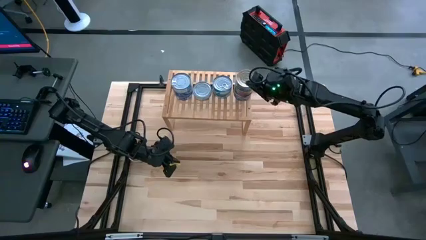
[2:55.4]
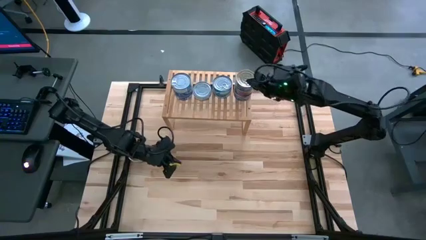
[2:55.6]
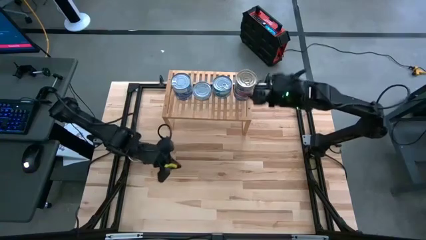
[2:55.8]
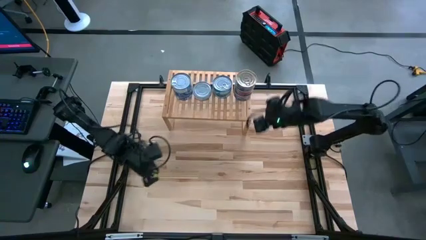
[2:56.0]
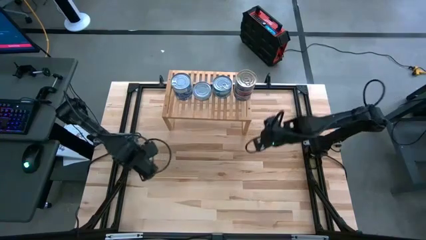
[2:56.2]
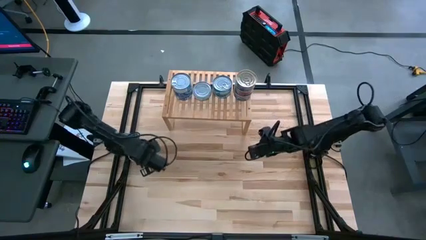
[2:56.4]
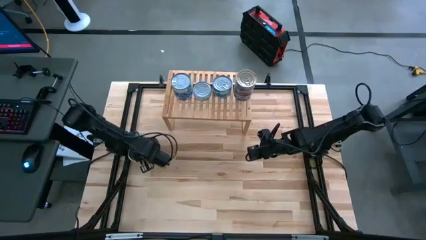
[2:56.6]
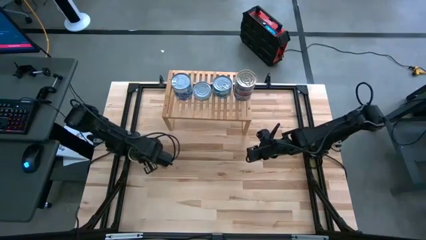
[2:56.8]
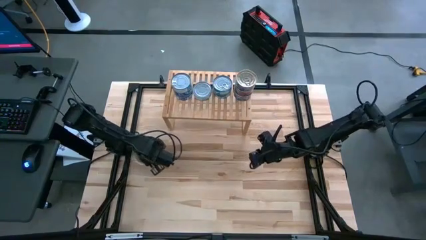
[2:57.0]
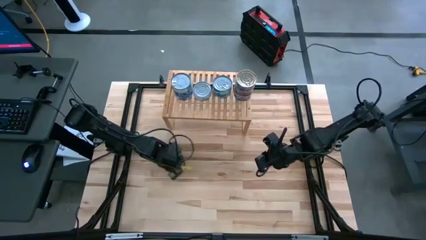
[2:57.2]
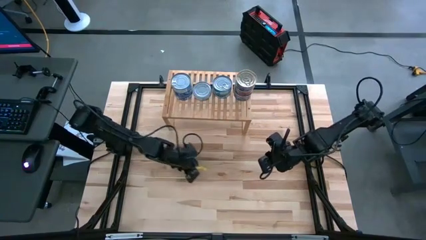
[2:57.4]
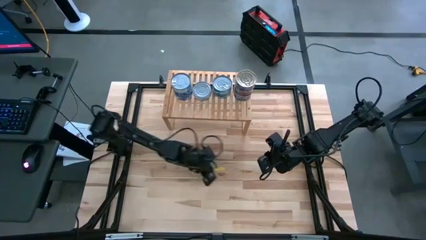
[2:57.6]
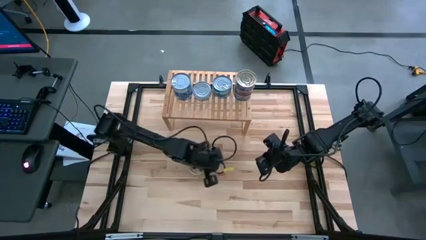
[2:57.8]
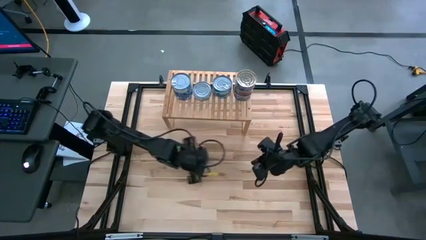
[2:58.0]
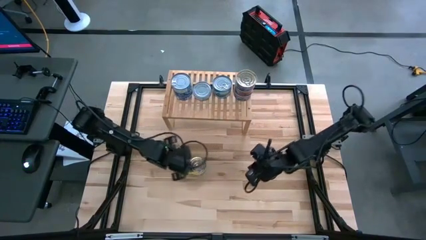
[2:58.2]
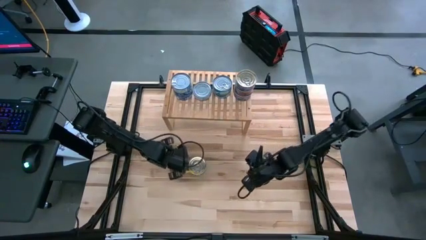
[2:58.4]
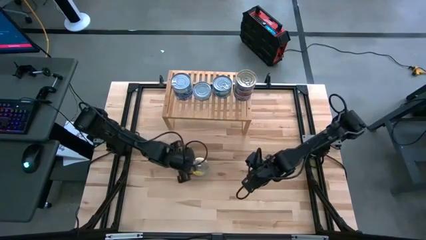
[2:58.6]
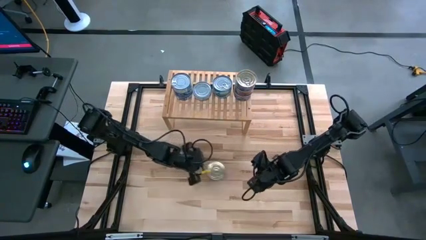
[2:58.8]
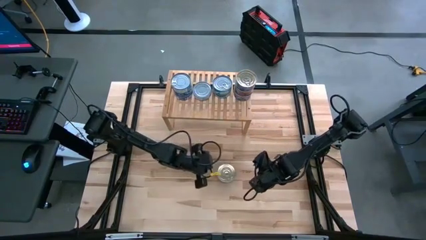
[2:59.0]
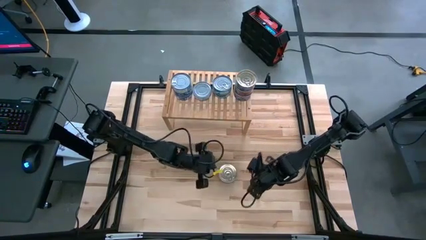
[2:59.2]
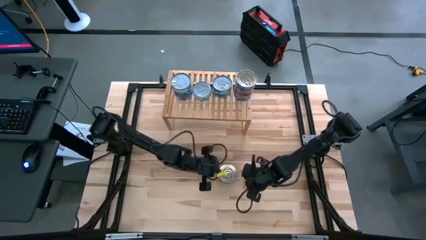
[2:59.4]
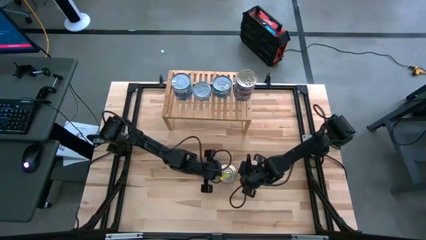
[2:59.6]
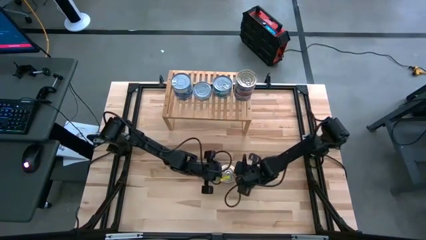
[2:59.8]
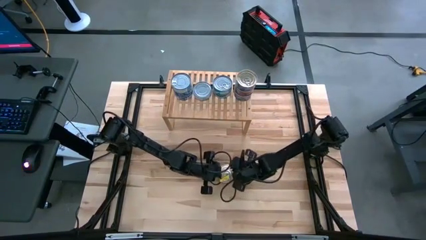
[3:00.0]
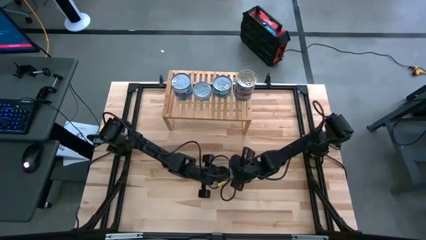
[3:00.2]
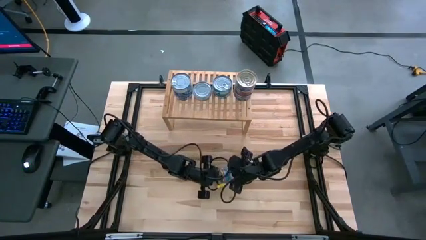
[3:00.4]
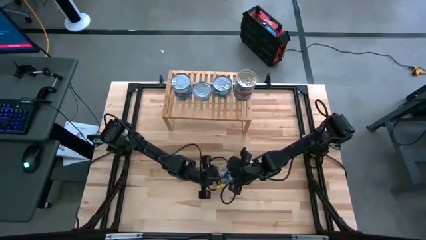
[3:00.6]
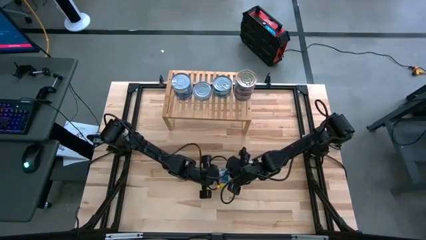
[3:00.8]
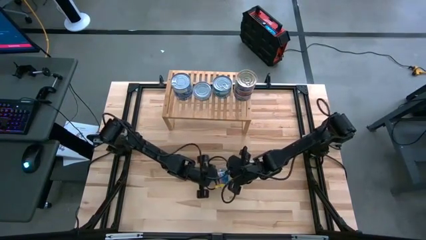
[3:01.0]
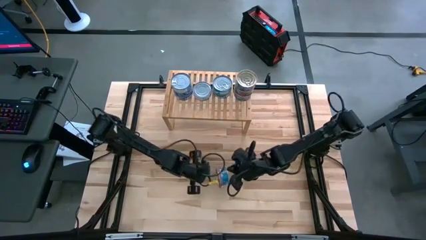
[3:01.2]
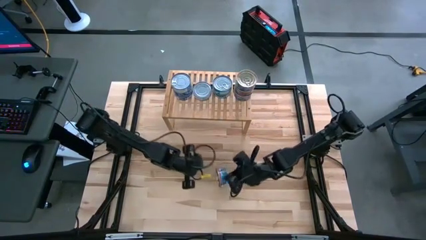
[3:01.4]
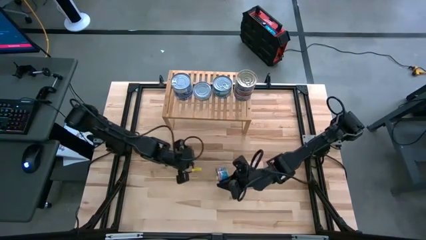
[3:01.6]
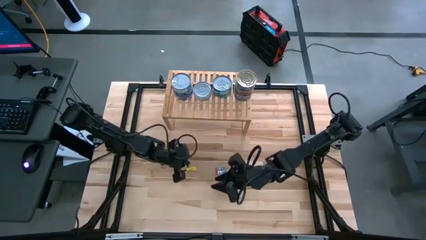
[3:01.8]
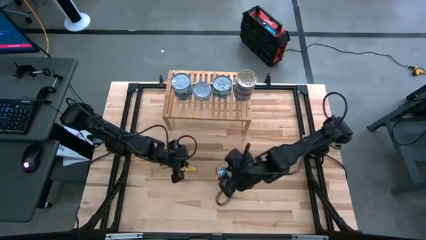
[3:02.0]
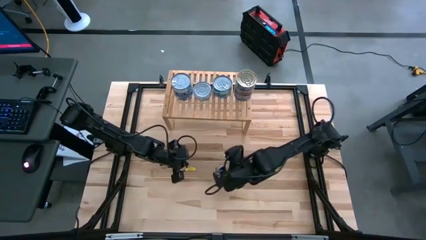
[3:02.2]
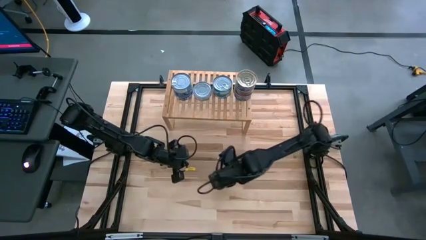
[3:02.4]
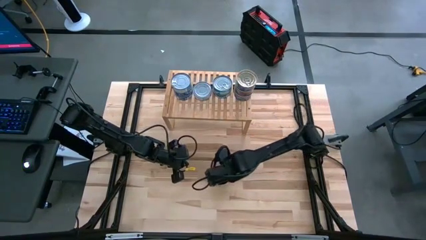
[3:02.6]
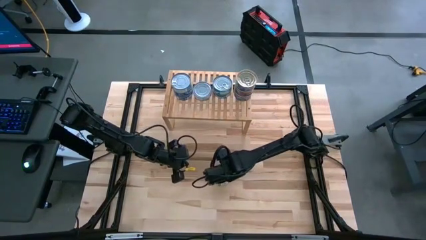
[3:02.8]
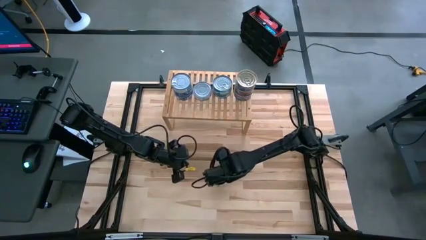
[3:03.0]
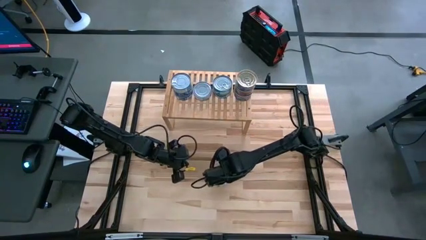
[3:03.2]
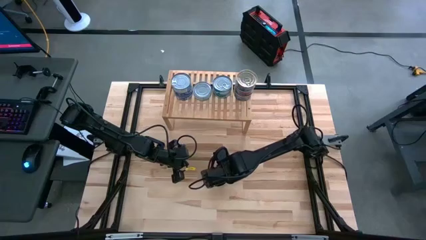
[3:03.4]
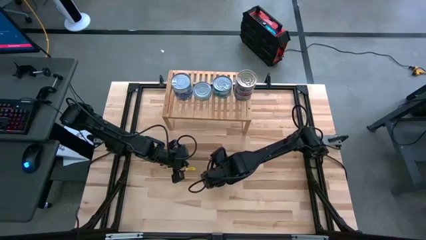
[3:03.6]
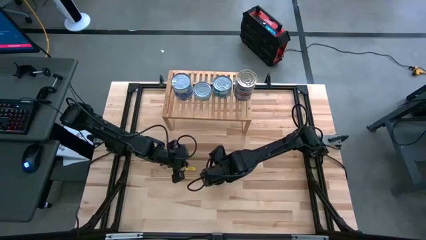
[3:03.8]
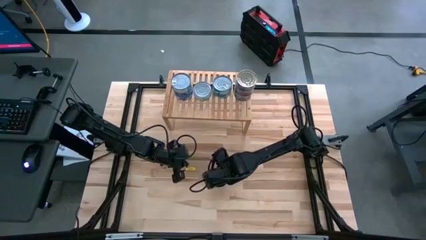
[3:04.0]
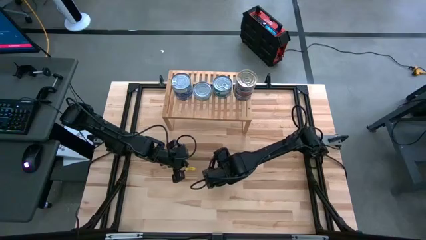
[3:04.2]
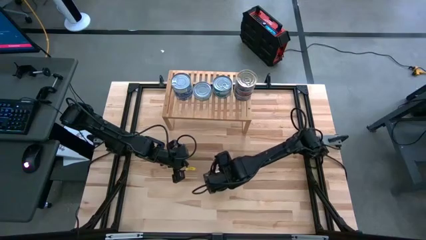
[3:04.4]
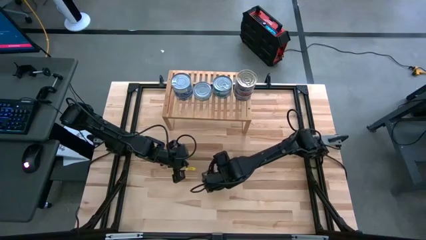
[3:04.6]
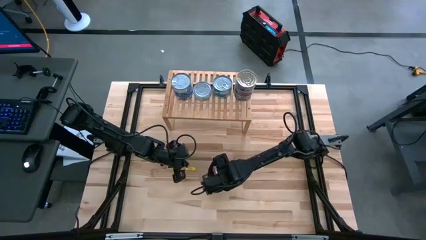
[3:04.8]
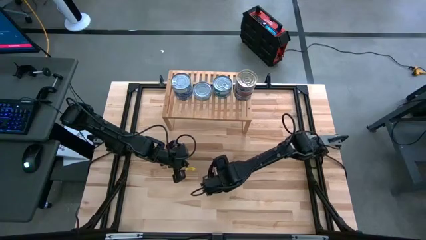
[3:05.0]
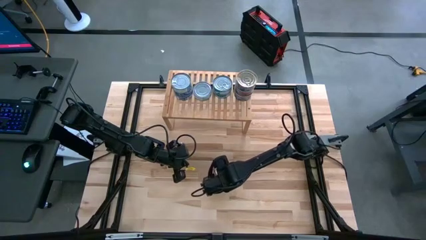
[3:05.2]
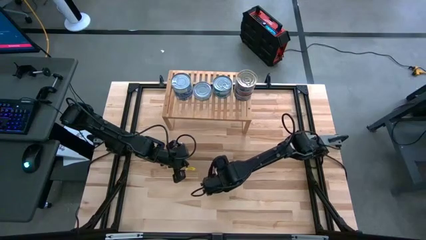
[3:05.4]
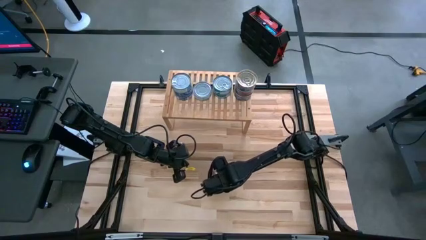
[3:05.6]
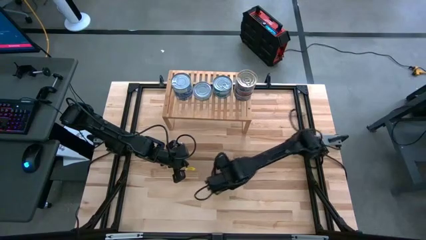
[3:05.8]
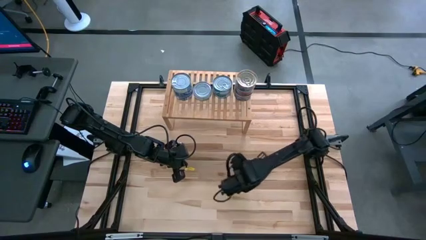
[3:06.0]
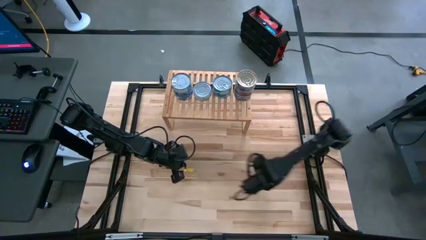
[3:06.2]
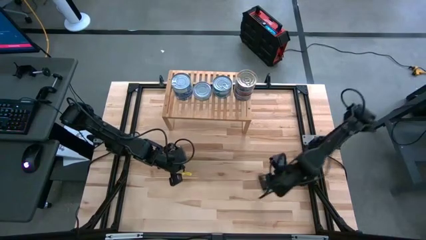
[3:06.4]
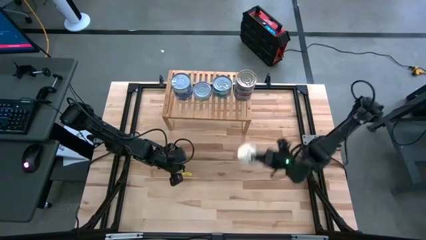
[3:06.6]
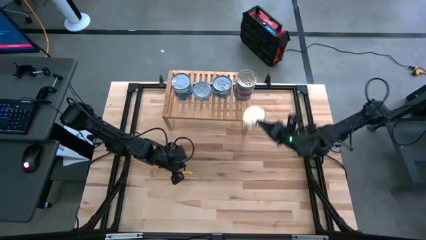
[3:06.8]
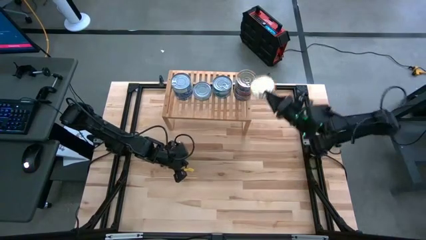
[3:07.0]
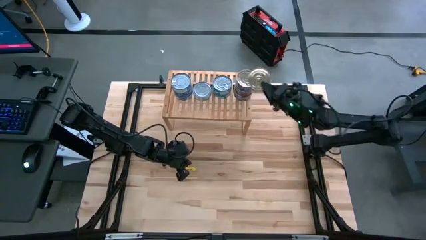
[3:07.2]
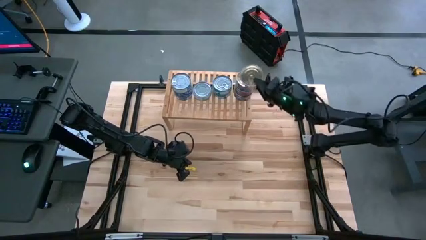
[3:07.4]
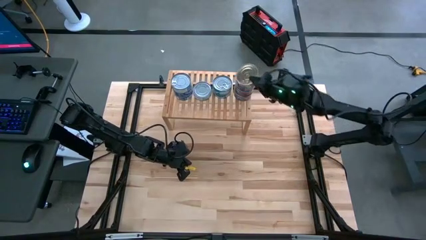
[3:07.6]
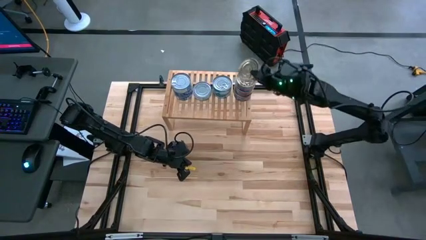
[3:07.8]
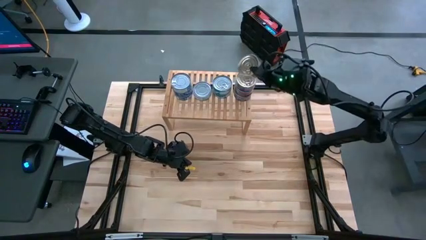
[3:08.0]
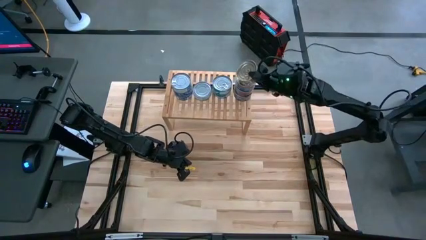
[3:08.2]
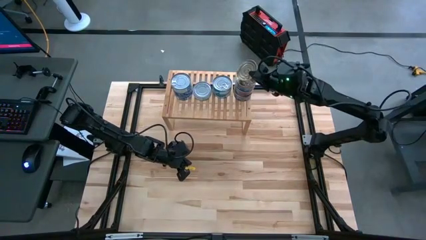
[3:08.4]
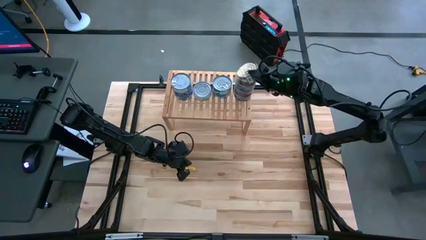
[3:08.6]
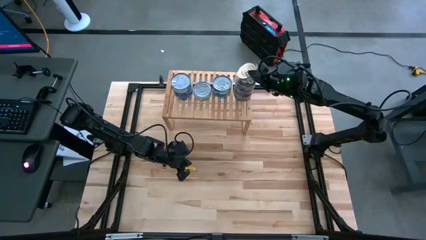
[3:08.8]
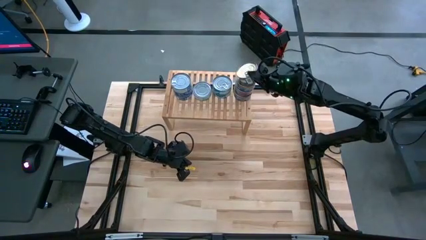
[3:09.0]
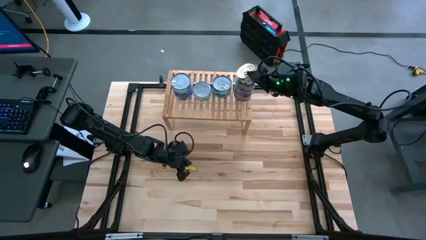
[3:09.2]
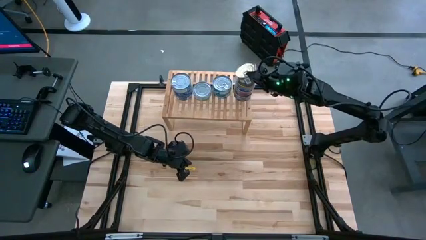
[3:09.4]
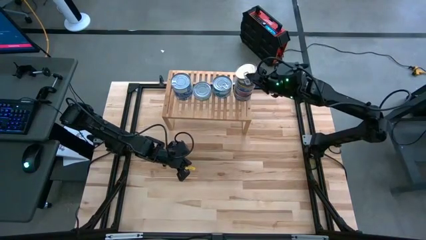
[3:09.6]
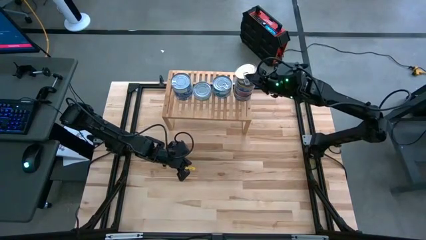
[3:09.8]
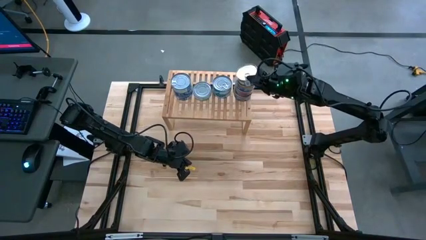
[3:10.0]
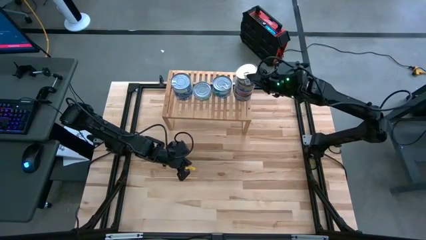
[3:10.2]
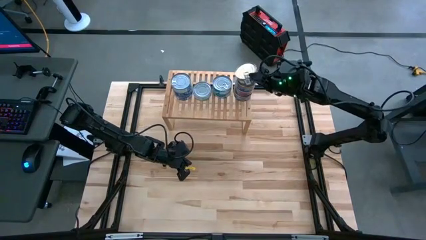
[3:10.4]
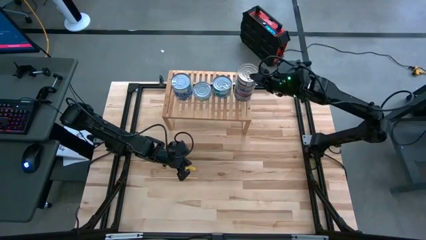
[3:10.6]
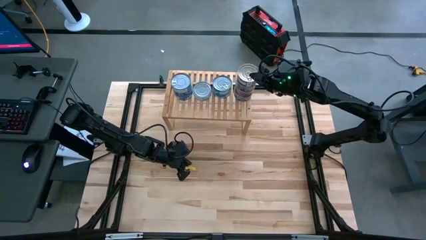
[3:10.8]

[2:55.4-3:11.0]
Task: Stack canned seafood by type on shelf
Stack the blue-pink tuna can on top of the other blue-pink tuna can on the shelf

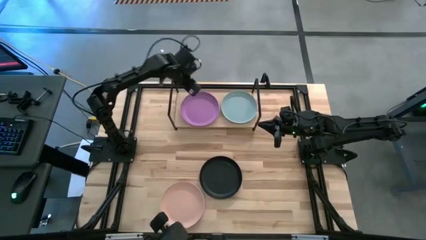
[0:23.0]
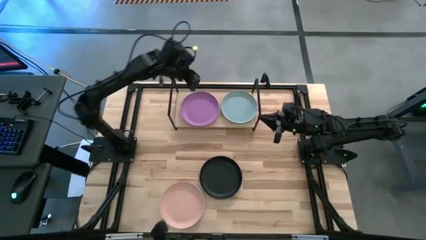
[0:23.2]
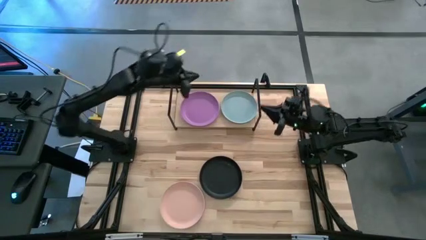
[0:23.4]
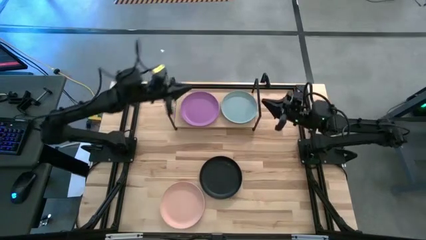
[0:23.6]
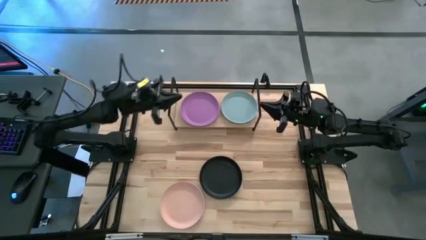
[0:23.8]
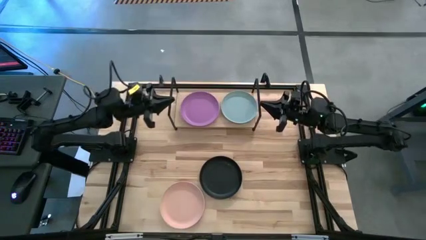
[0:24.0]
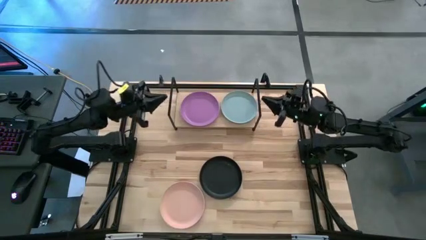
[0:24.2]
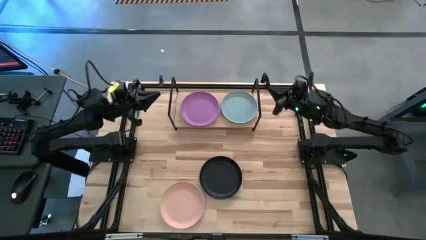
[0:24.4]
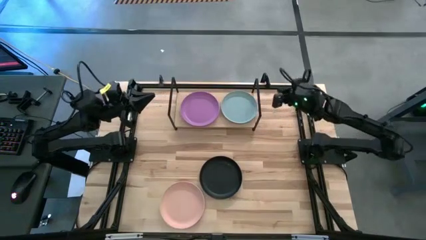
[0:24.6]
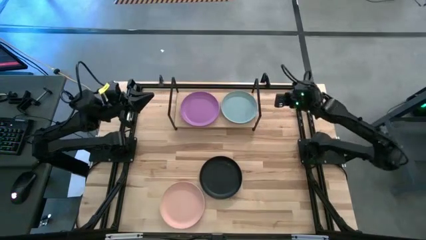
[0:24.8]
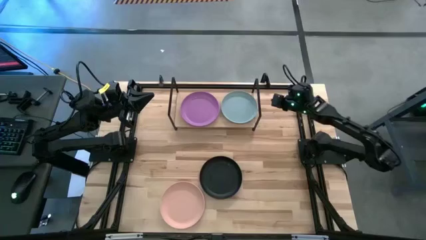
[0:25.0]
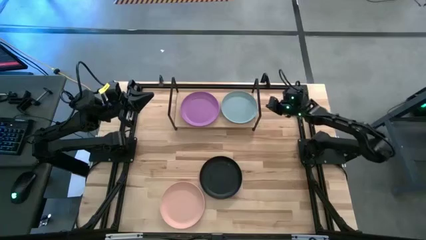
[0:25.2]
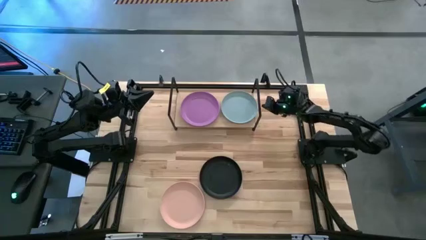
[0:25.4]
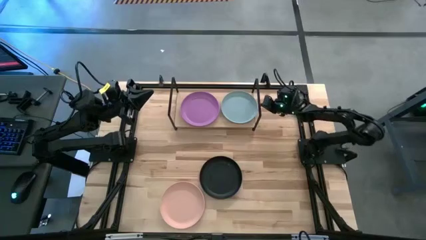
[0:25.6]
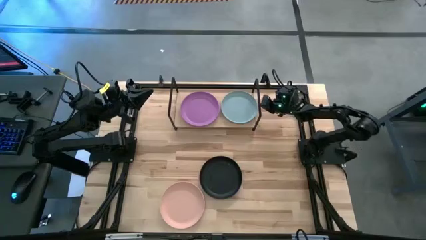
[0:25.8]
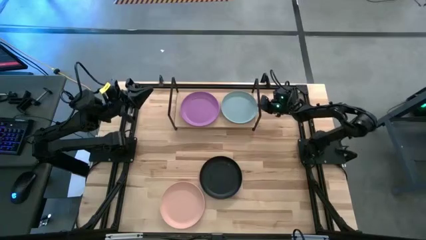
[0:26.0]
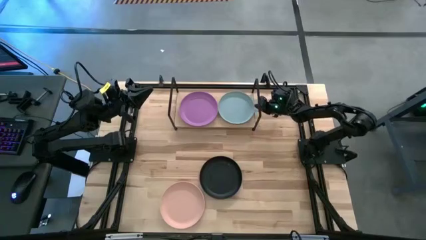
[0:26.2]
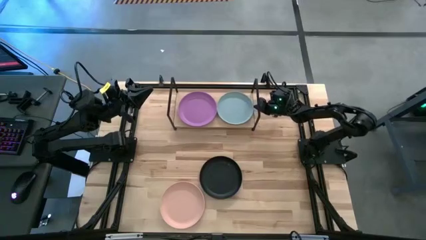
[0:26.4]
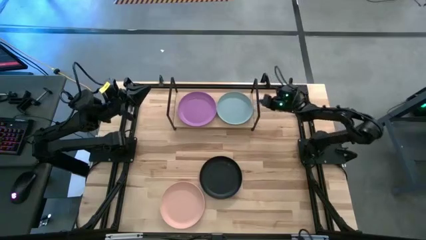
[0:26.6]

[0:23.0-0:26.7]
Task: Place and stack plates onto a shelf
Adjust the gray plate
